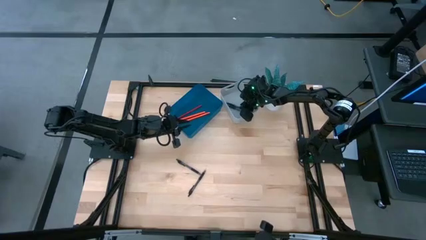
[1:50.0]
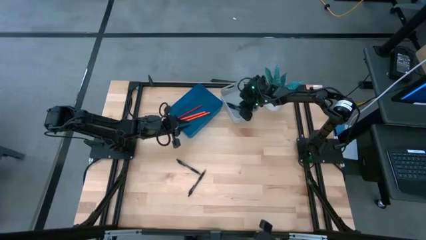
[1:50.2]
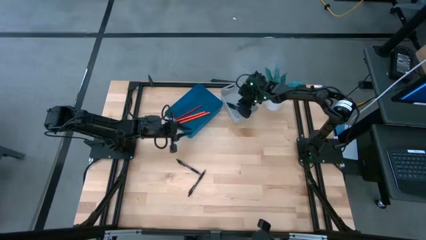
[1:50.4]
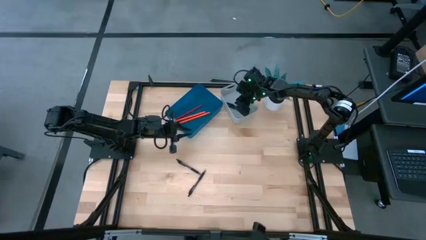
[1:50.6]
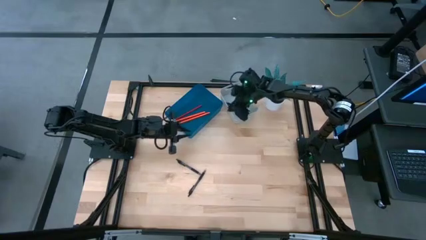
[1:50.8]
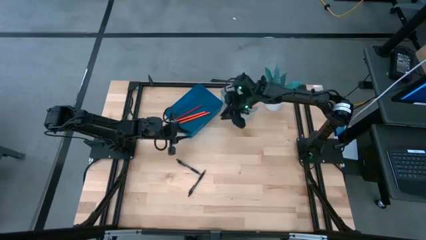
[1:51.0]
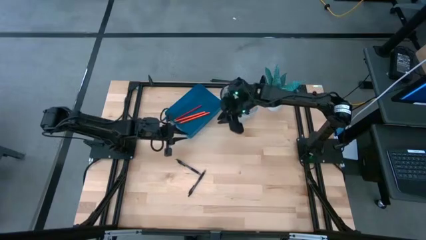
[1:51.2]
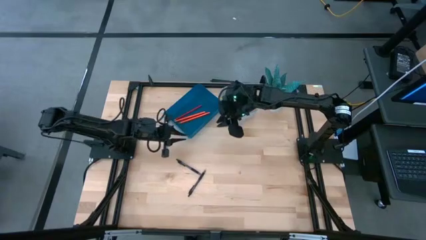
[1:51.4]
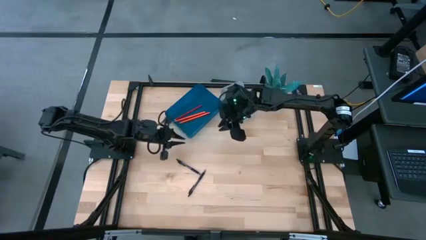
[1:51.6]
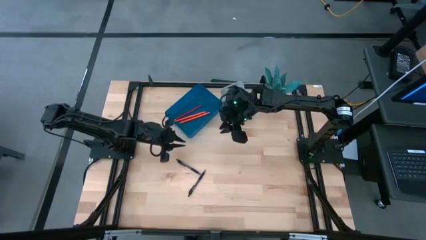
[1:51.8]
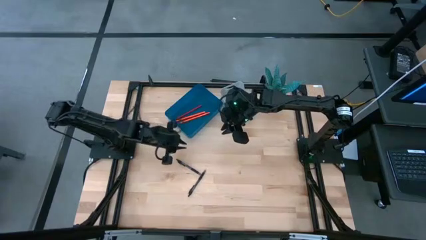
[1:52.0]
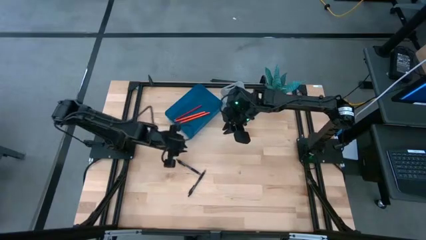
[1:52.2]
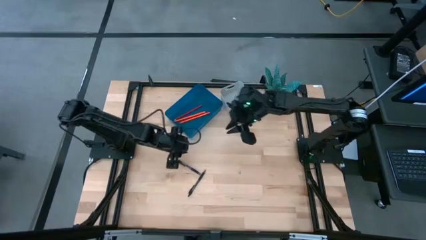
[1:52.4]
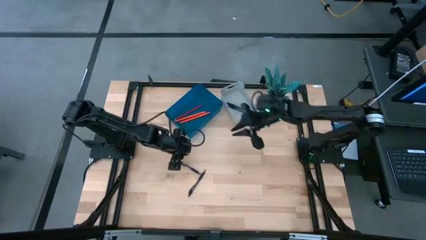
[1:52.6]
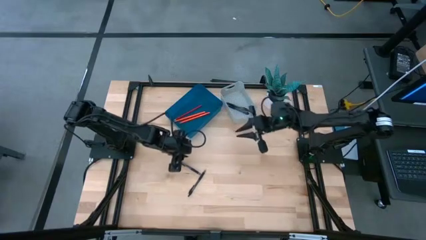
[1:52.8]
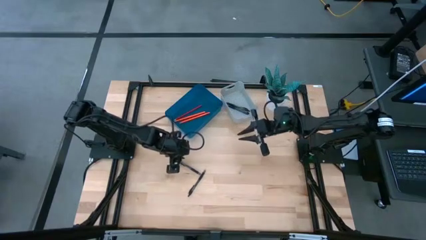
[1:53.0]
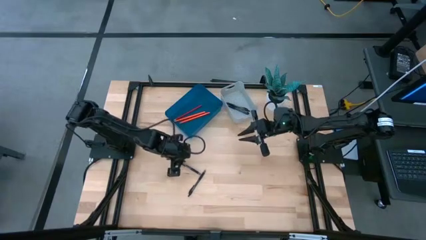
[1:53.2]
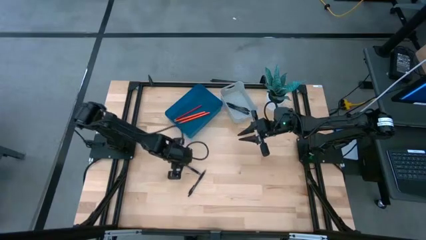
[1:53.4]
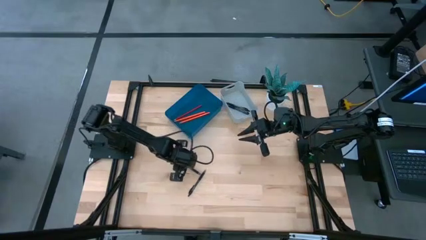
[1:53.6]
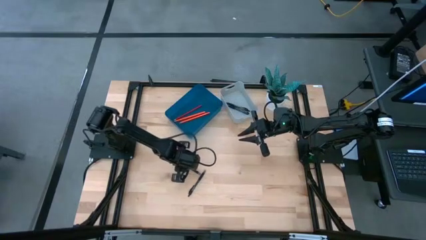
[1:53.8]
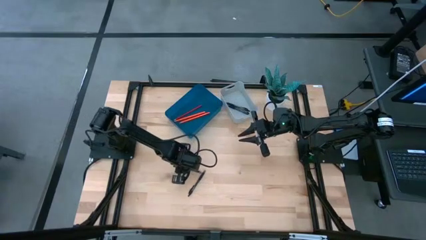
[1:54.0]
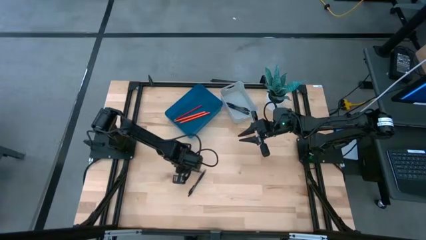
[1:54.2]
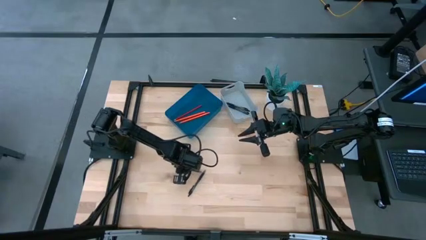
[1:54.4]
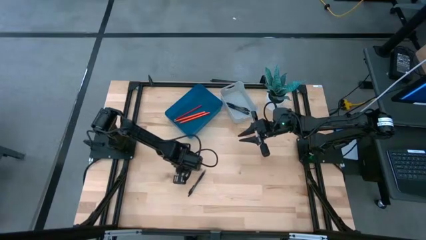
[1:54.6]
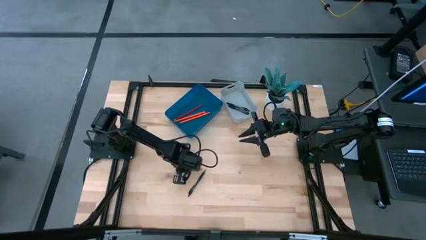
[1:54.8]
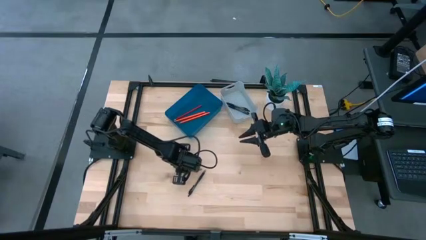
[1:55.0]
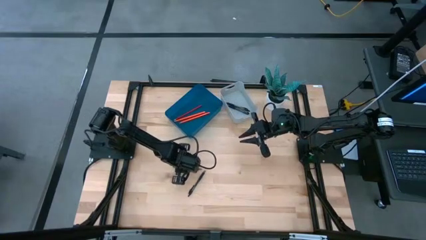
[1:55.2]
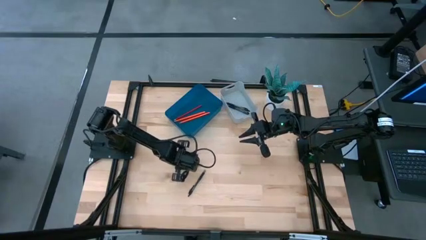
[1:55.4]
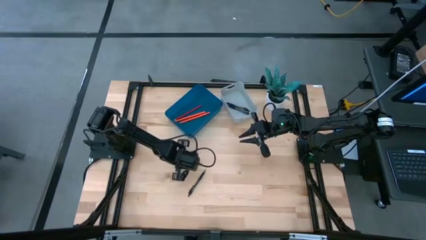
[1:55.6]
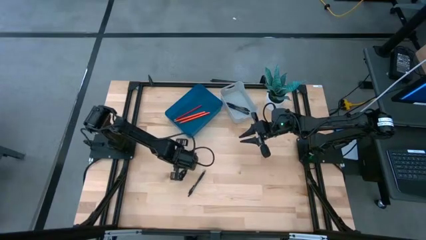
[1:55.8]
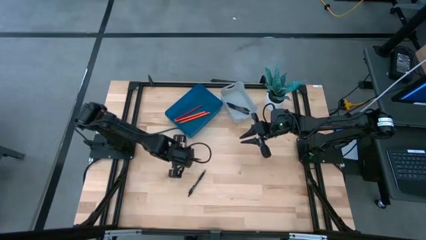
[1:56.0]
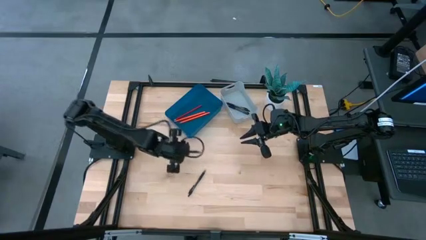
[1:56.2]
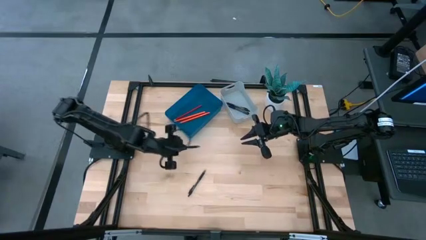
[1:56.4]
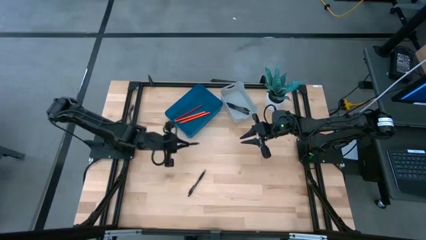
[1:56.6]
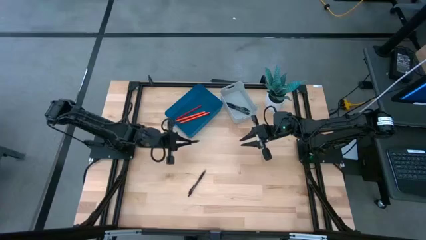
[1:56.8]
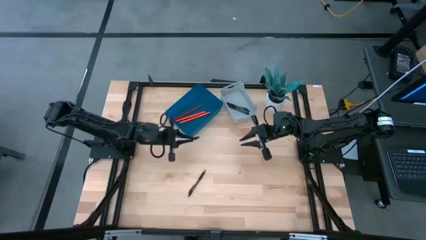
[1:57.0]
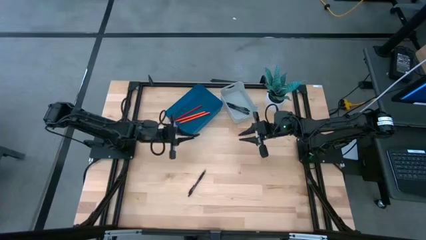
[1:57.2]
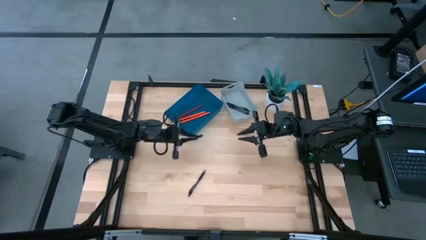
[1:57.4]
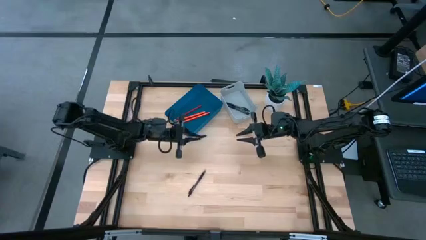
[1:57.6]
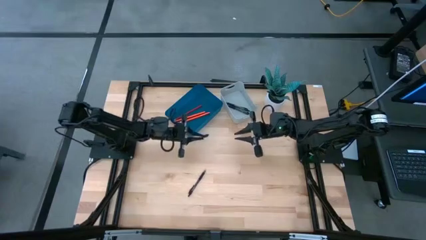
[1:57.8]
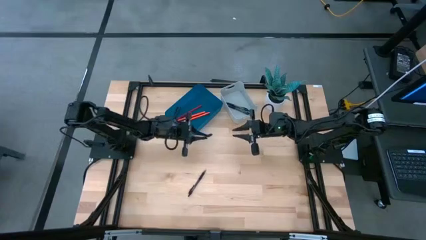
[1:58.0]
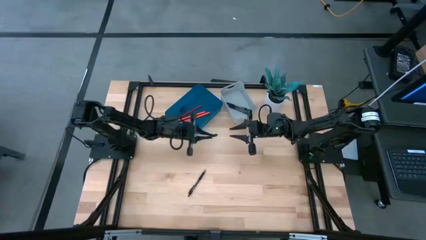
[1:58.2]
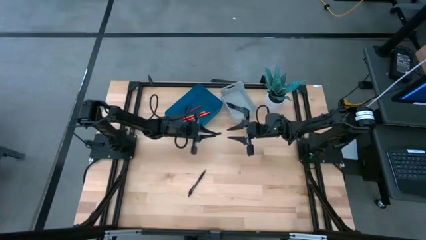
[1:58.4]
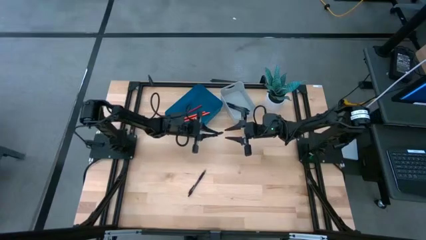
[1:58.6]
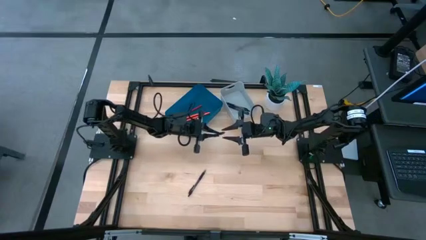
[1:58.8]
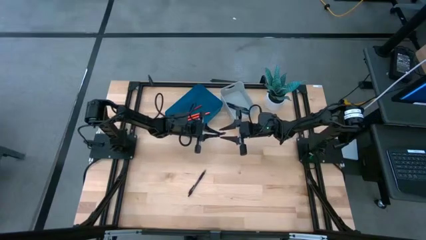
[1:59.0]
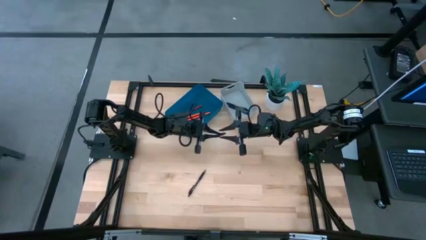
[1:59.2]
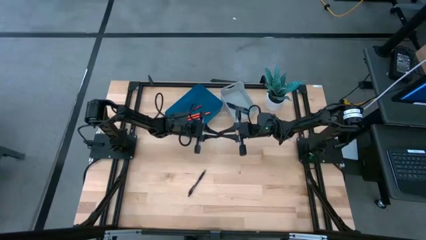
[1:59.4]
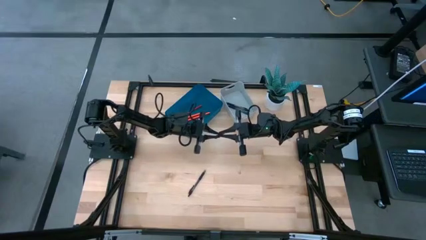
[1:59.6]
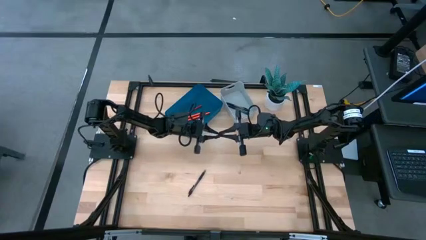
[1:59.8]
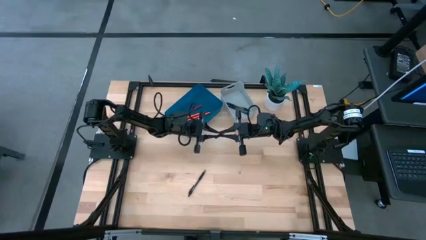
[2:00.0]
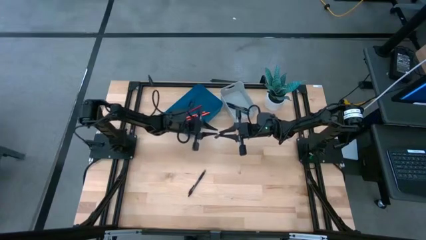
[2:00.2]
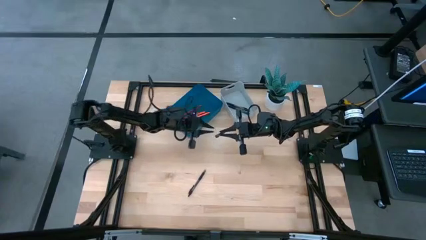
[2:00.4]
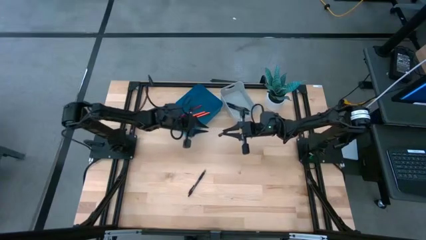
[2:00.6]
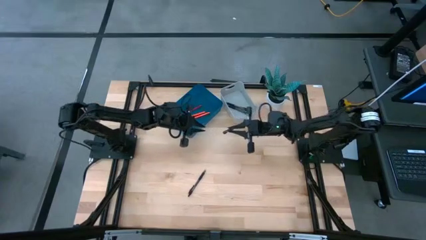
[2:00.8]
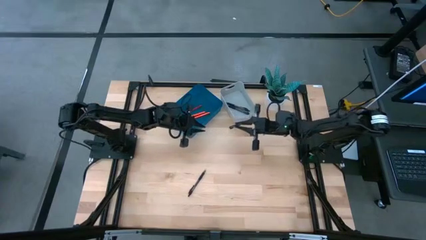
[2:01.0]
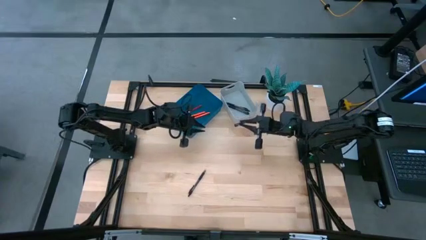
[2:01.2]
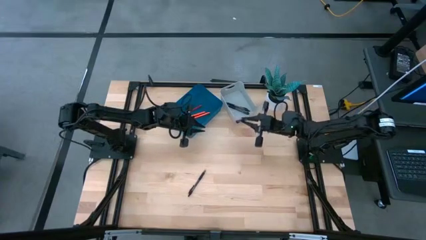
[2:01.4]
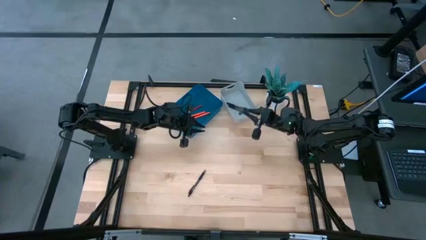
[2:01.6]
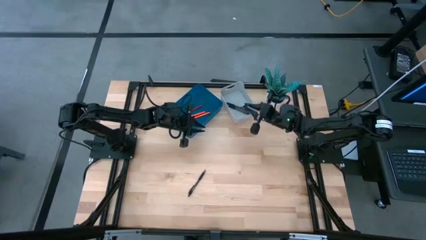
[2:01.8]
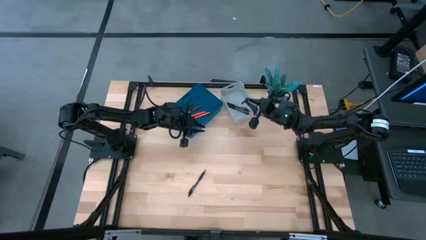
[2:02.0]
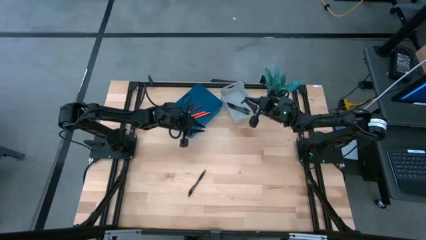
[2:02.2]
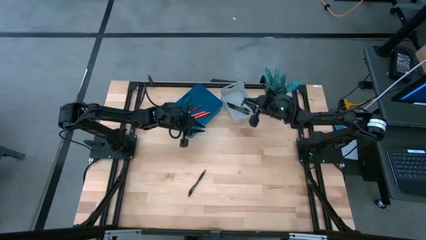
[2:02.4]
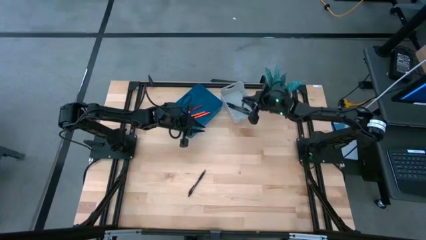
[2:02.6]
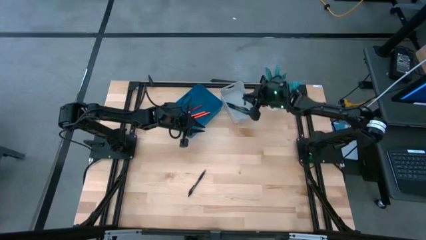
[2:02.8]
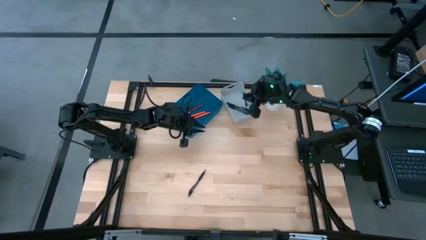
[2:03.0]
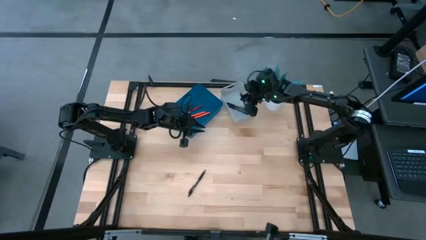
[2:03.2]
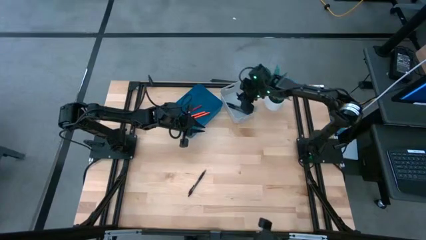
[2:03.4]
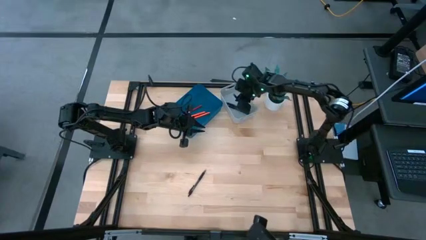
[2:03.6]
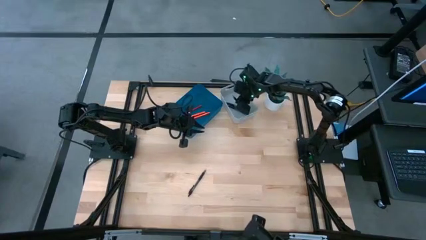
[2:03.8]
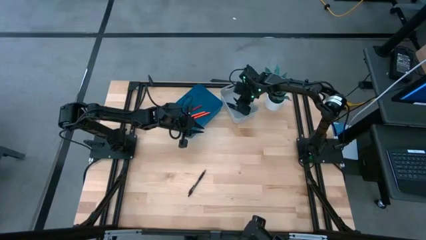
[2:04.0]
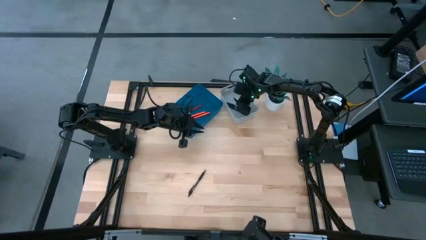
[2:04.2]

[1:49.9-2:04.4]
Task: Sort pens & pencils
Put the black pen into the gray bin

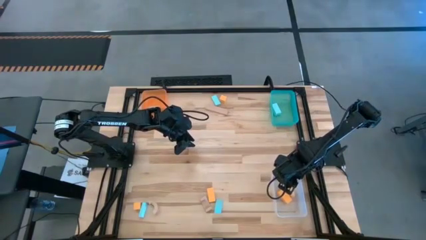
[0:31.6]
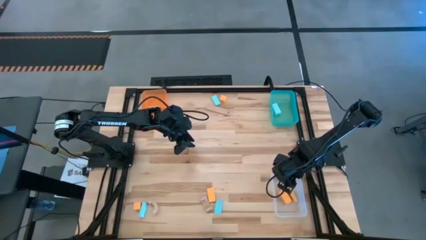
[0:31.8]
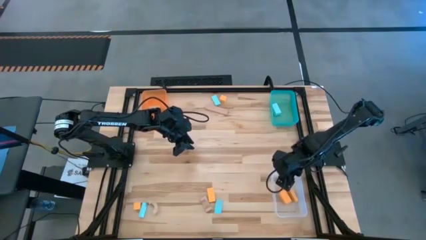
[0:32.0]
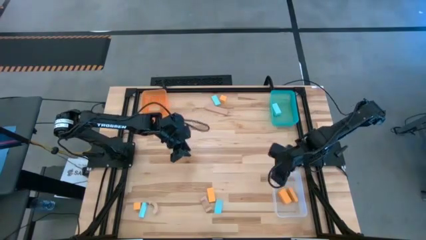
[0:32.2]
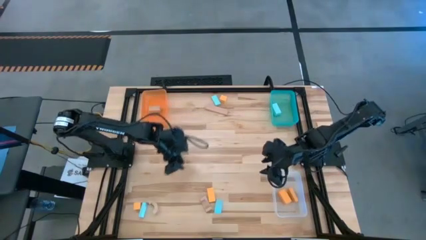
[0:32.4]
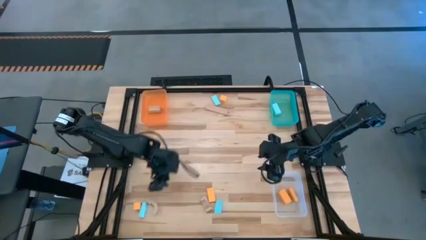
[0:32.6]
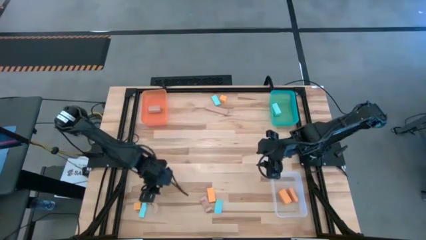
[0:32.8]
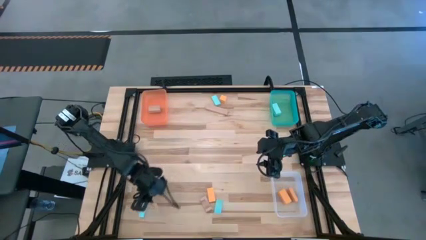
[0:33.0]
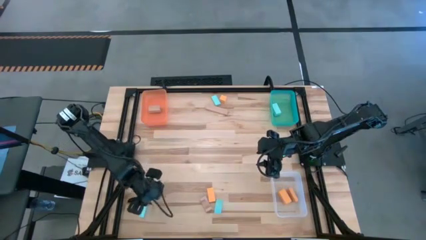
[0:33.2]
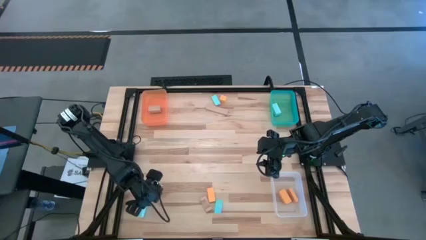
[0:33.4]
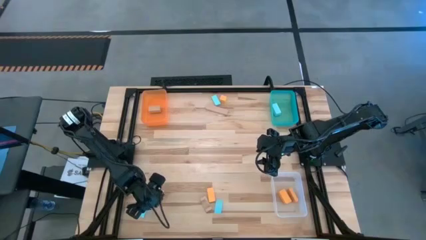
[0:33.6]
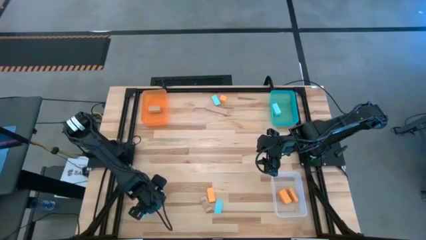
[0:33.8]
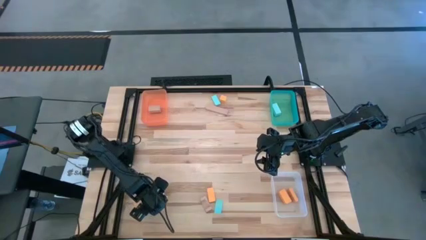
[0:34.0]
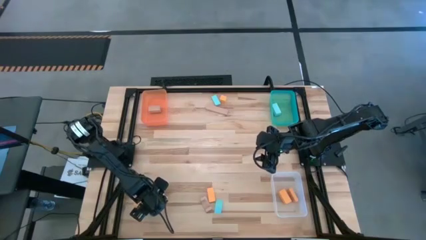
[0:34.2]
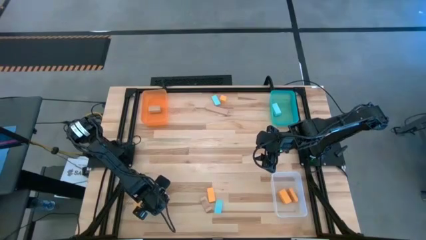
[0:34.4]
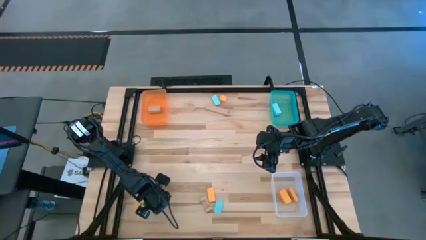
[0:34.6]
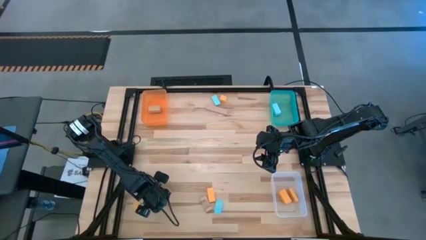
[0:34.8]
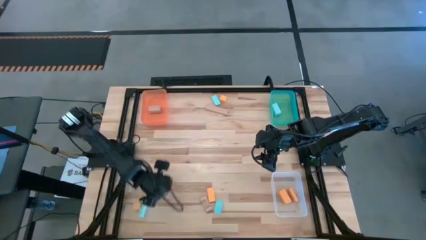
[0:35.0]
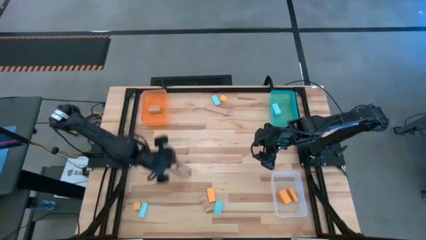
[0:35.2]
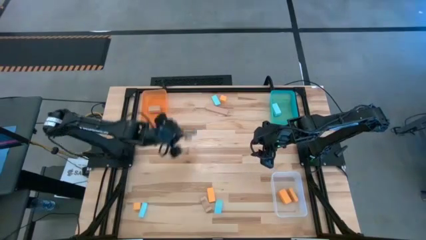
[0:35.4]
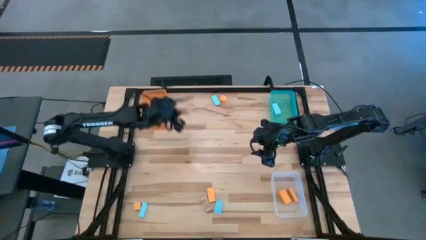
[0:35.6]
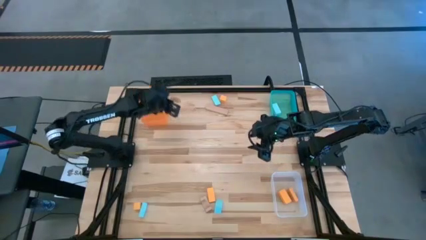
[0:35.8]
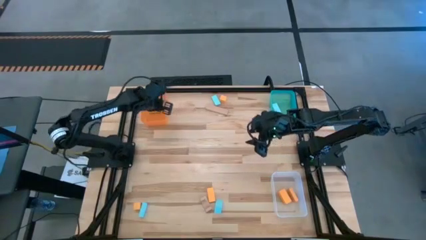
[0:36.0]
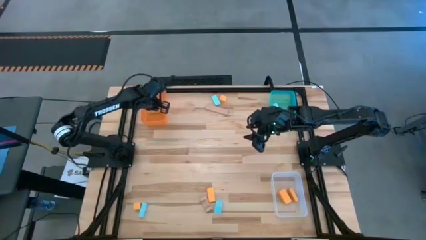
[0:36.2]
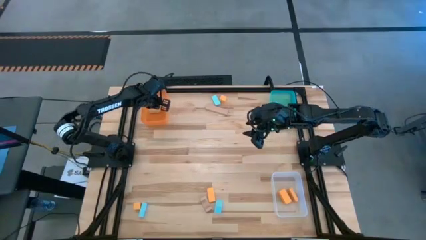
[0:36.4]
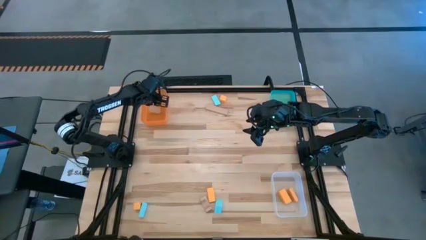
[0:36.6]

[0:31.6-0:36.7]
Task: Sort & place blocks by color
Put the brown block into the orange bin
